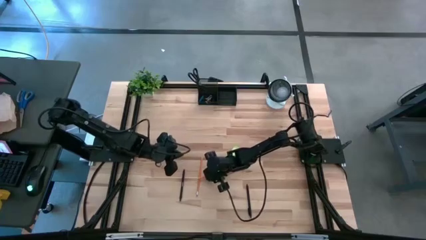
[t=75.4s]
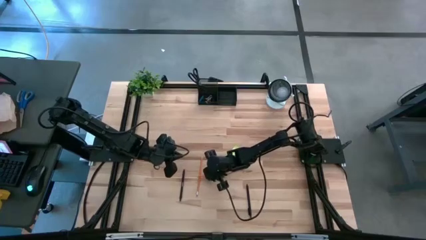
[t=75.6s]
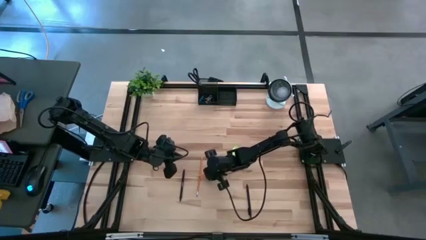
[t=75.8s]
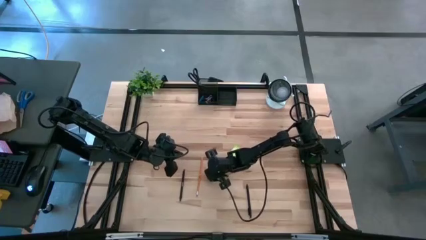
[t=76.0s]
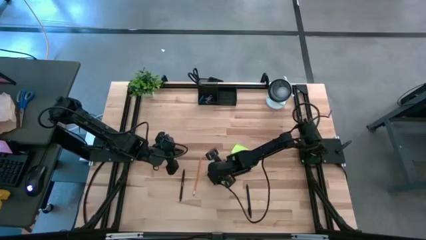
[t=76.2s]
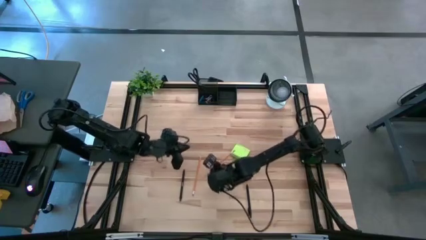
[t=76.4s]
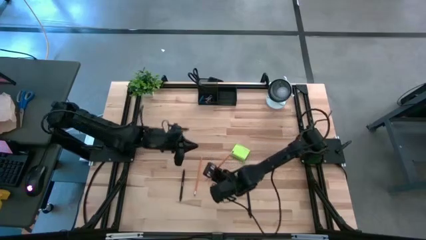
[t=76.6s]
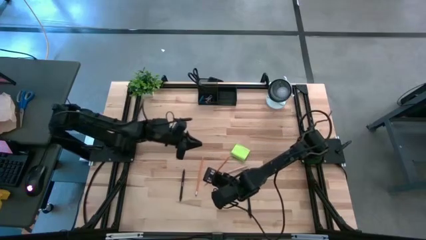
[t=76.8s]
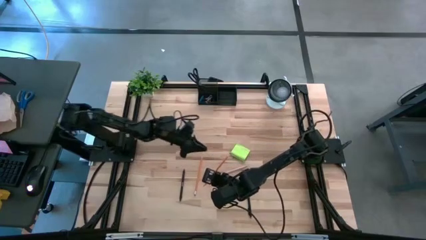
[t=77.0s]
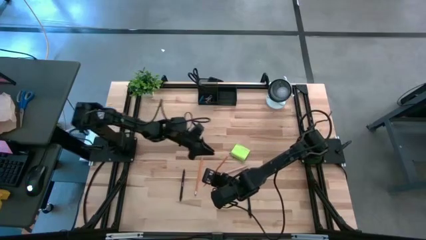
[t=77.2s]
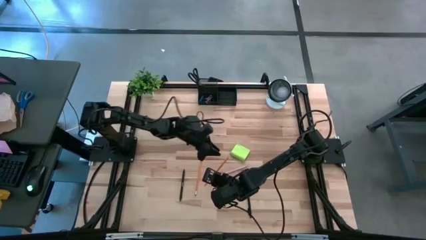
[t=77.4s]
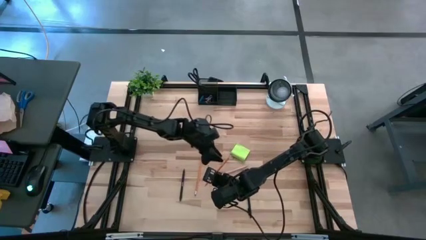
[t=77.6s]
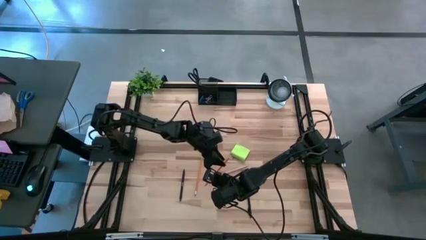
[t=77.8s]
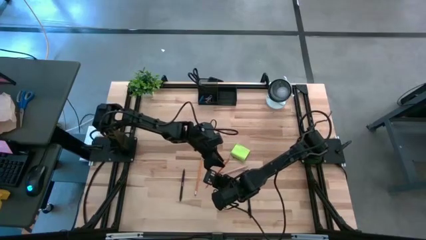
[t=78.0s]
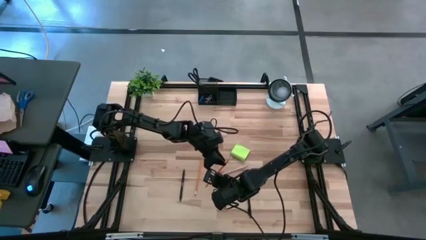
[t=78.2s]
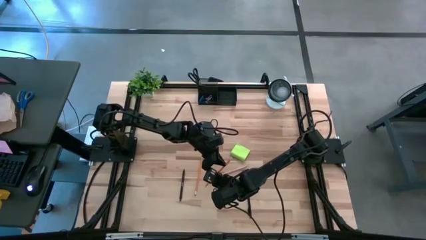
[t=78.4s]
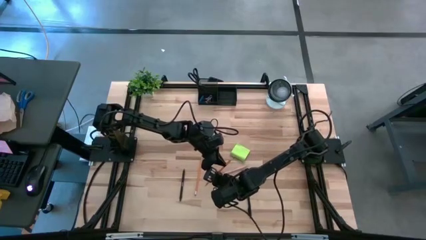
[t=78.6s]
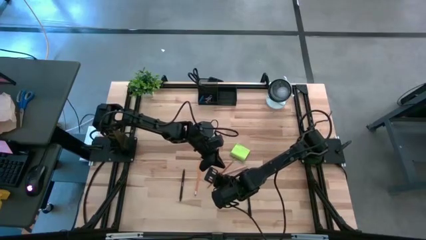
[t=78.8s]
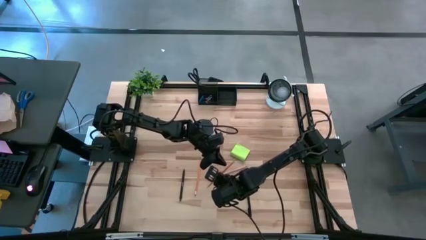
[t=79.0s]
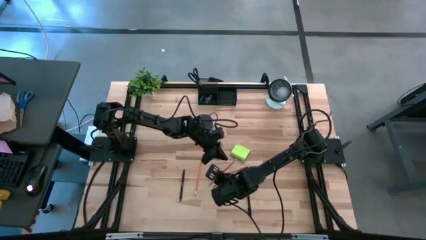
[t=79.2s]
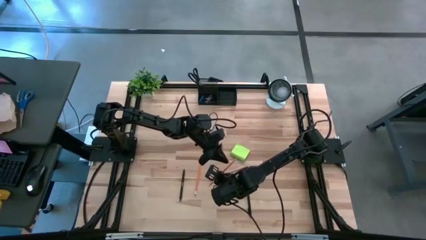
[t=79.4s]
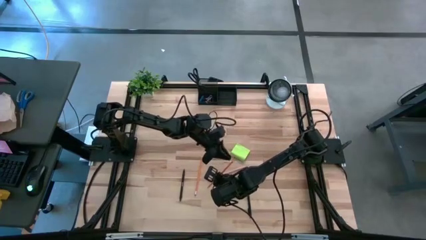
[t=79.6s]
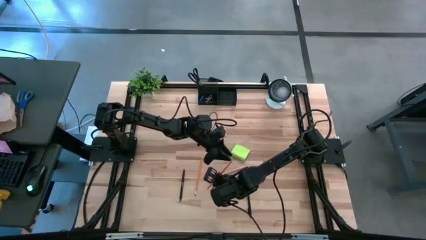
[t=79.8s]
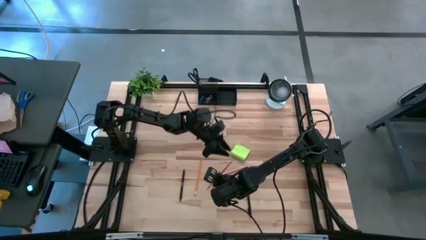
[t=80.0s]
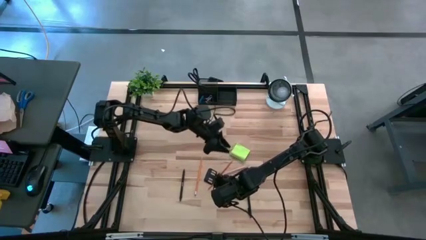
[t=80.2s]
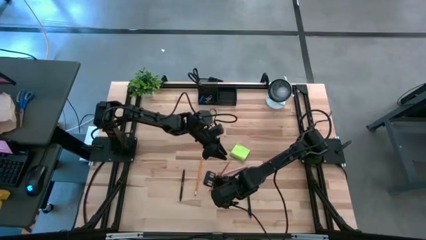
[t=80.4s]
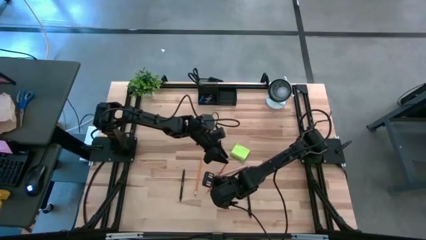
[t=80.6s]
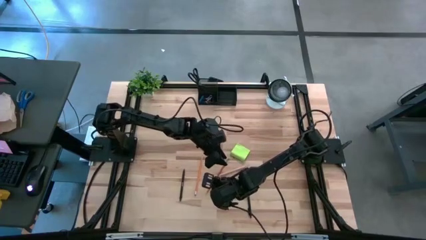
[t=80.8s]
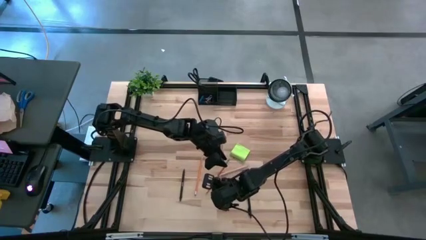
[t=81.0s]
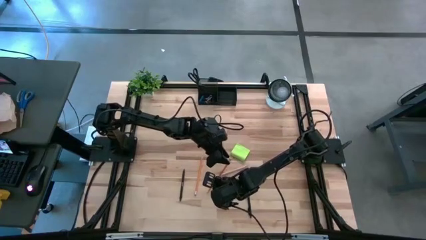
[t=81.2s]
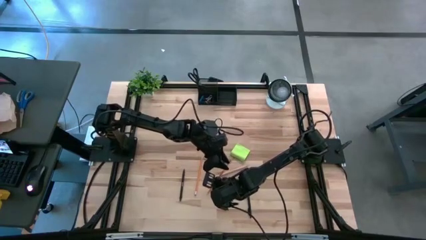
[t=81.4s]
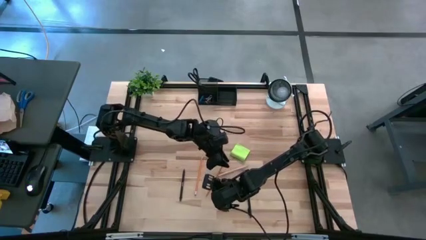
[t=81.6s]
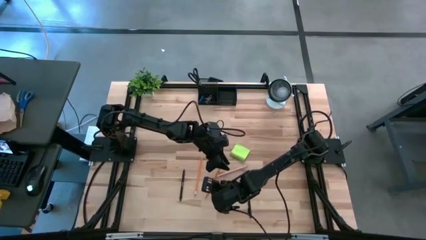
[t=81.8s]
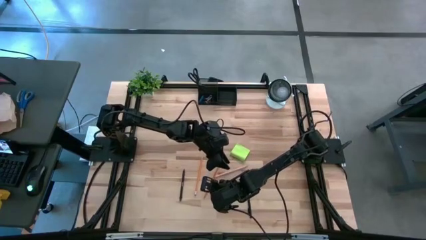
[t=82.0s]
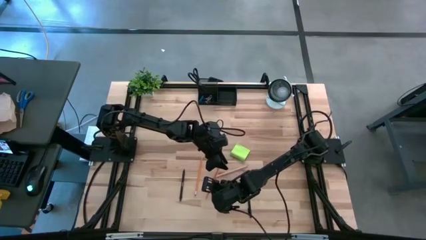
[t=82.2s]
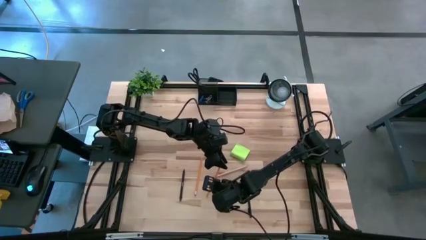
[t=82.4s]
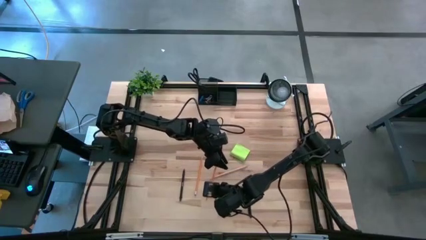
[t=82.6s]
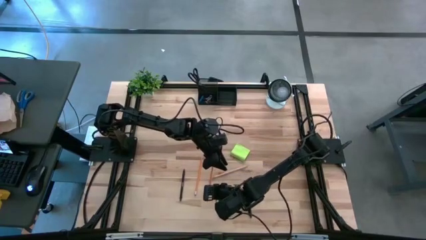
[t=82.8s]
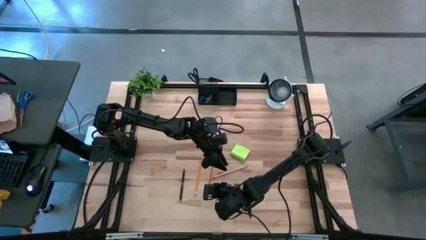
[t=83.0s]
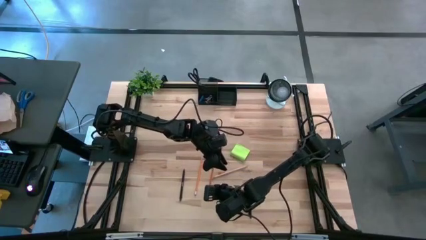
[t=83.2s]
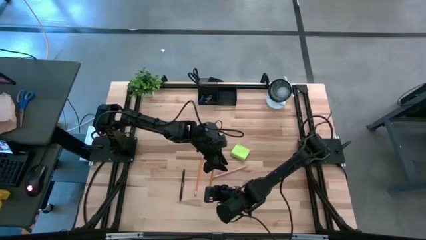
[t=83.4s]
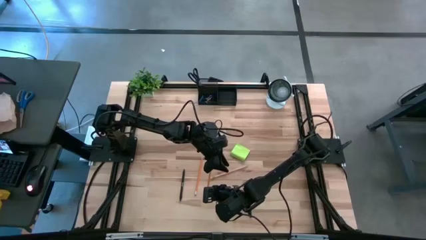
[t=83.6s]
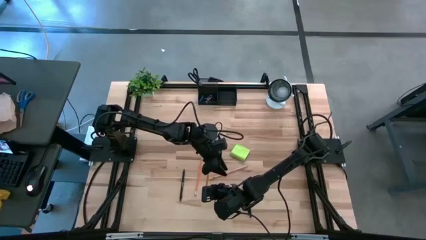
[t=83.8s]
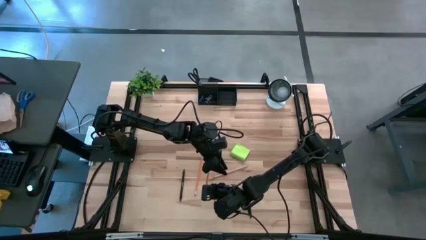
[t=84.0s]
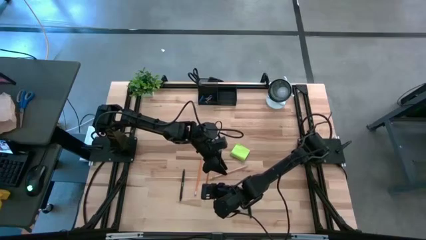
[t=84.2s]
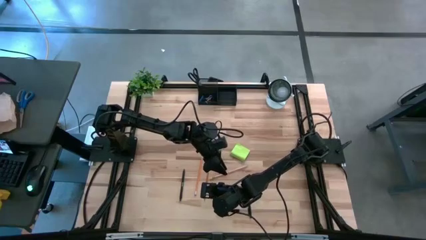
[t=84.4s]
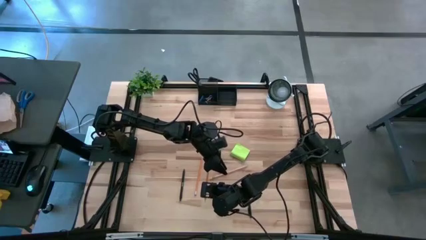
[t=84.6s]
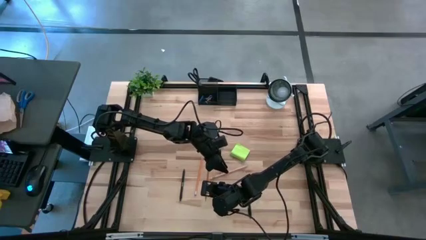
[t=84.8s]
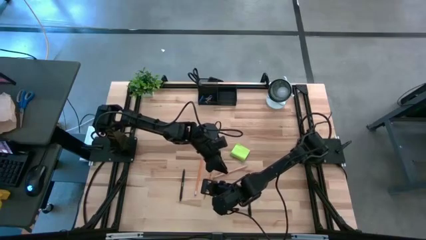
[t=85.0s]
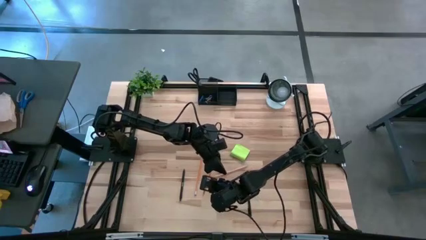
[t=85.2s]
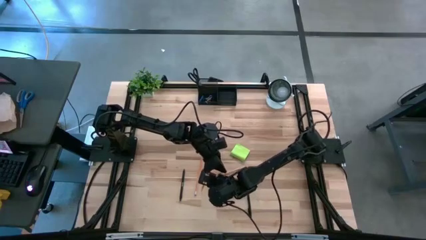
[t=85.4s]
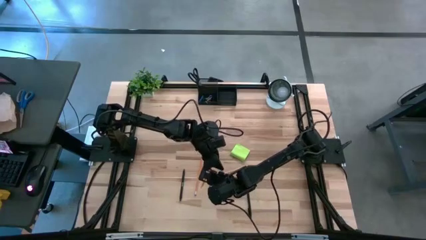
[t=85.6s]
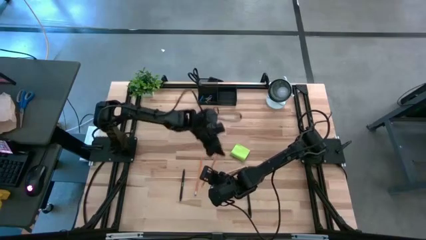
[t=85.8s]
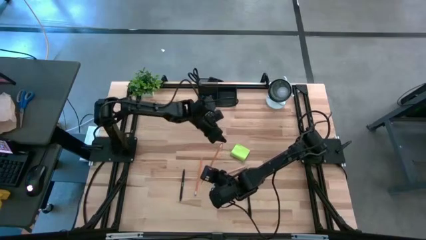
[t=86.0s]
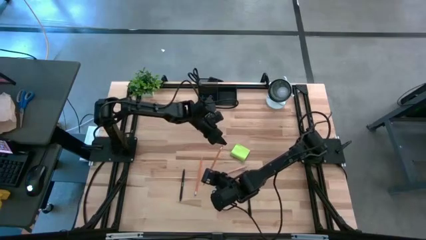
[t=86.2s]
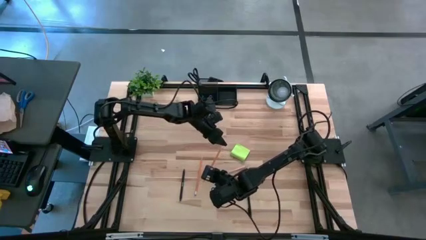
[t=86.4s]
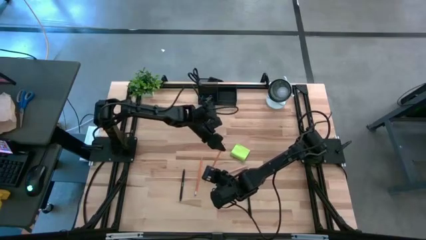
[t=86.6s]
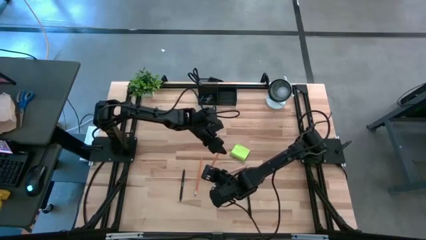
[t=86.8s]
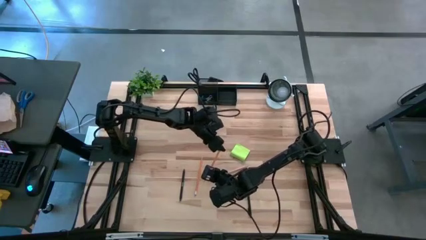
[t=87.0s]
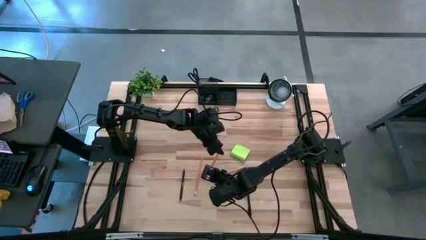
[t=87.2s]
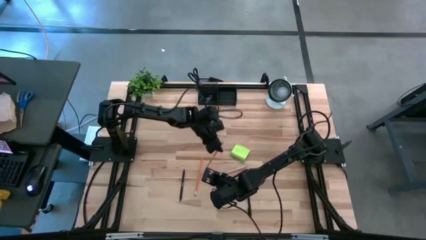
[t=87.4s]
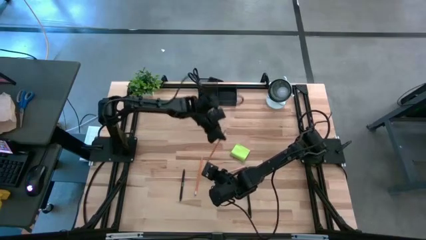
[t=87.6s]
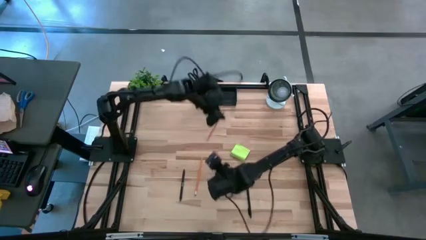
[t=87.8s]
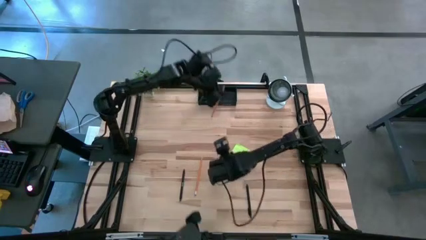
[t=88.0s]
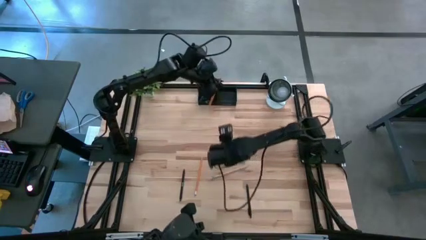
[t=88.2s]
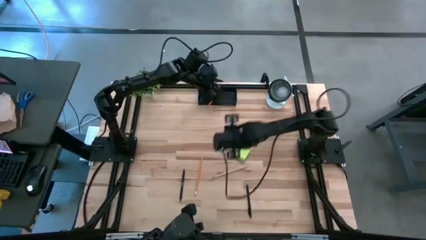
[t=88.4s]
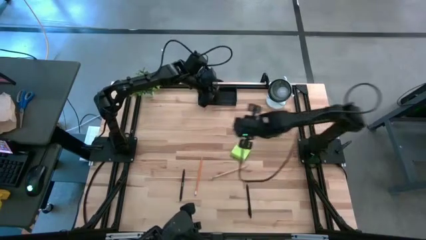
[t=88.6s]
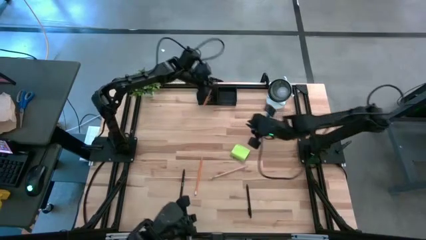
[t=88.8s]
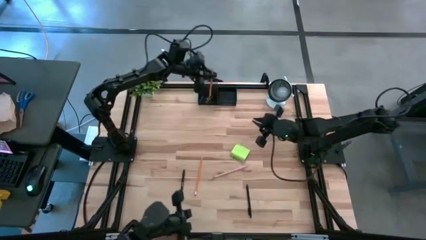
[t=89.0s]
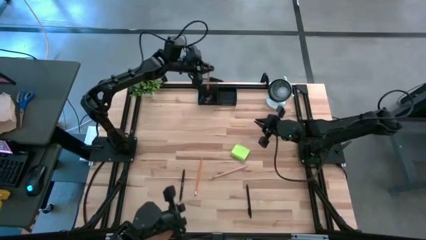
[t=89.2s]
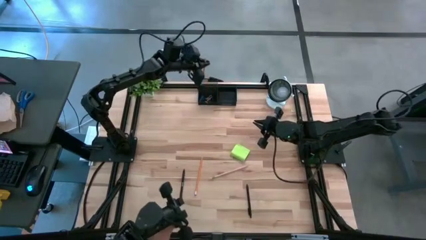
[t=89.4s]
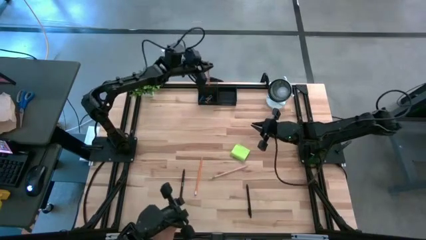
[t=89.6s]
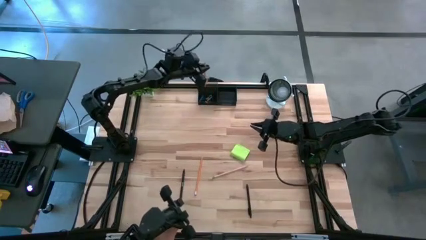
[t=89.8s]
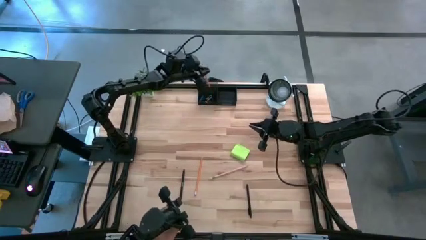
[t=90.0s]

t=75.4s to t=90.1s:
Task: Pick and place office supplies into organizer
Put the left orange pencil into the black desk organizer

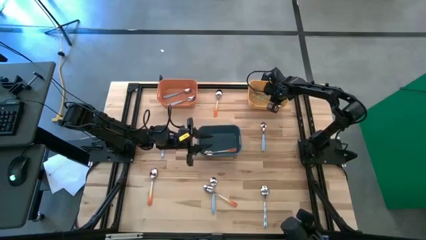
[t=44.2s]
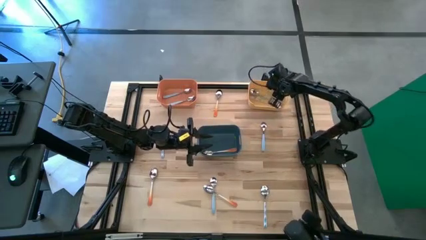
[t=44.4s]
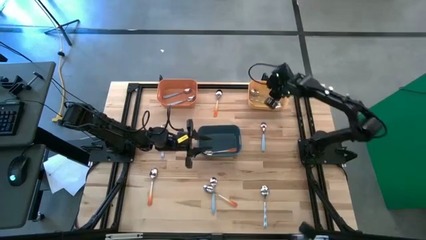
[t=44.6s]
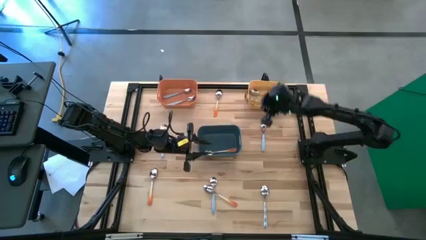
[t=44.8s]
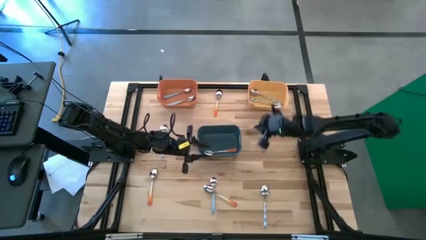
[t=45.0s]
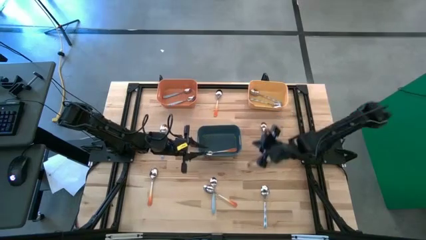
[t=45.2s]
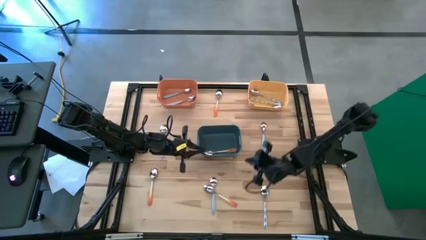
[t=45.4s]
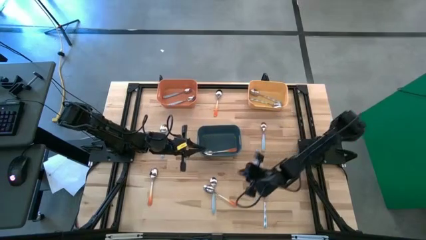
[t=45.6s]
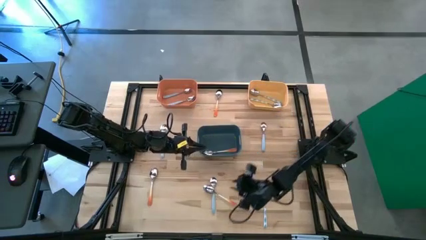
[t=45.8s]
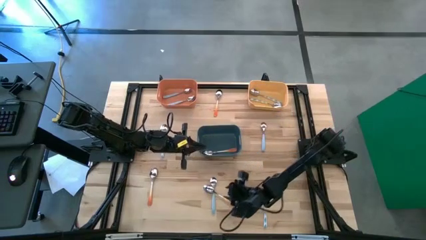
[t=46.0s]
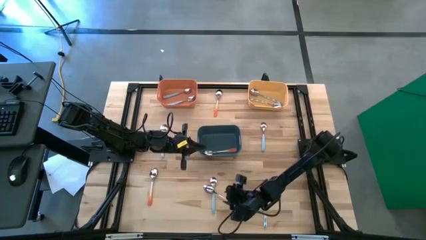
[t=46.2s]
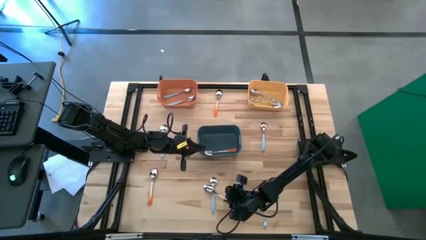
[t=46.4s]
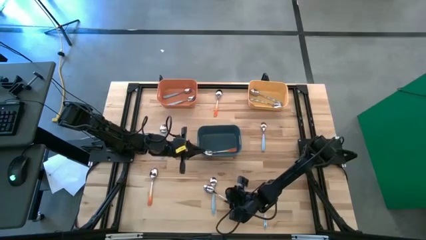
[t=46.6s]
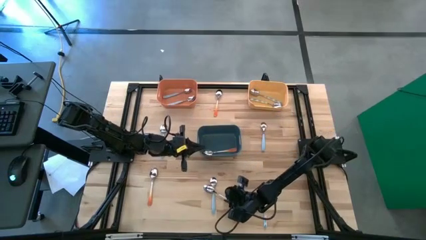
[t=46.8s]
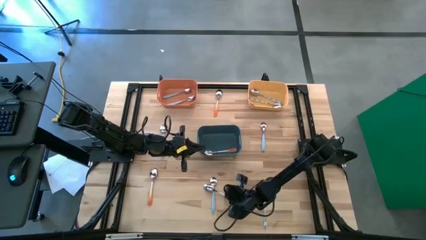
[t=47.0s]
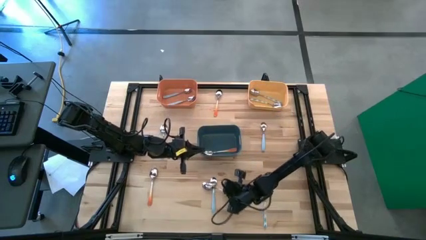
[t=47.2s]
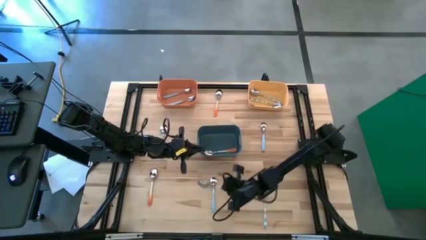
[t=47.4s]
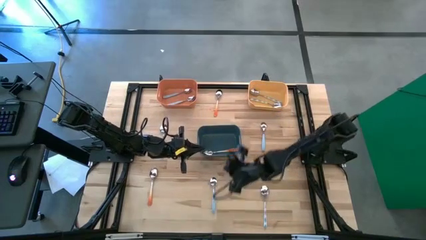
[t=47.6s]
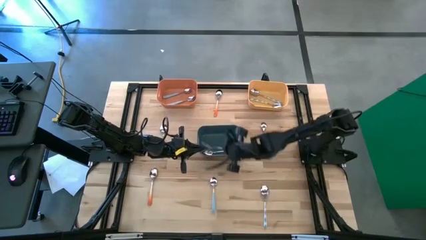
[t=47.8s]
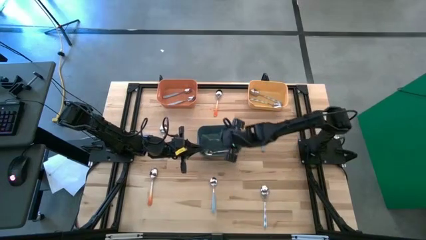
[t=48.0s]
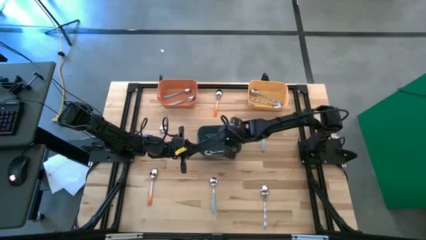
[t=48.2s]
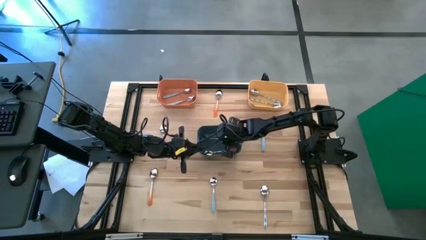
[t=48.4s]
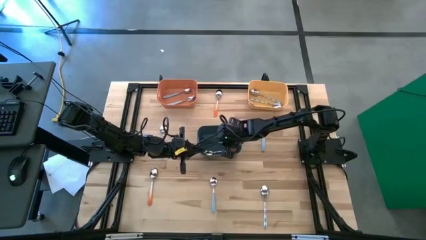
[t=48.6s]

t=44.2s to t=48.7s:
Task: Sort silverware by color (type)
Put the orange spoon into the blue bin
